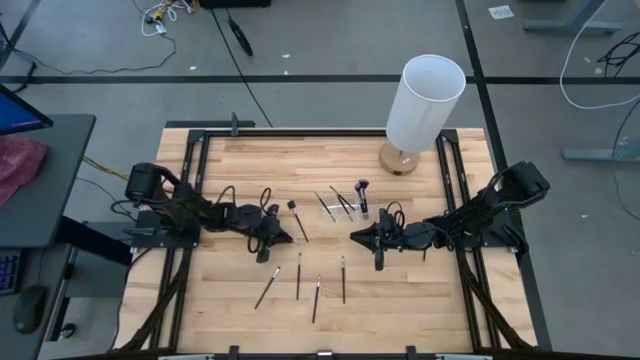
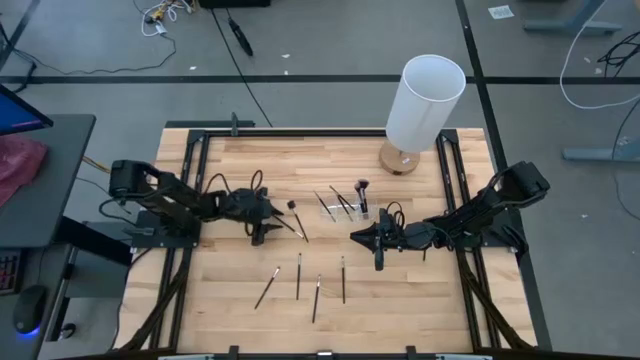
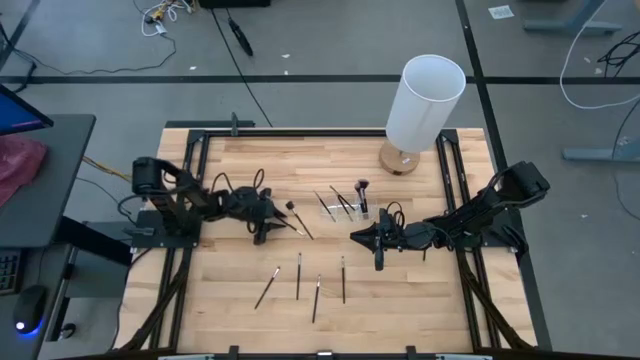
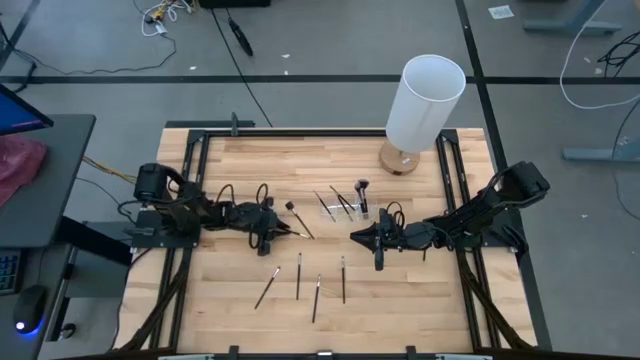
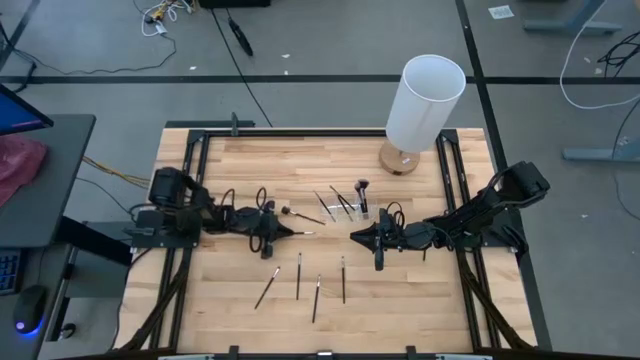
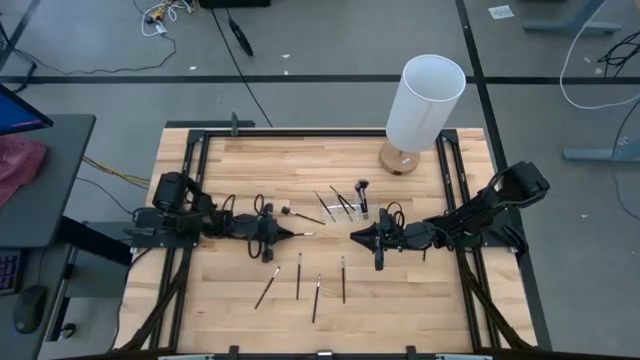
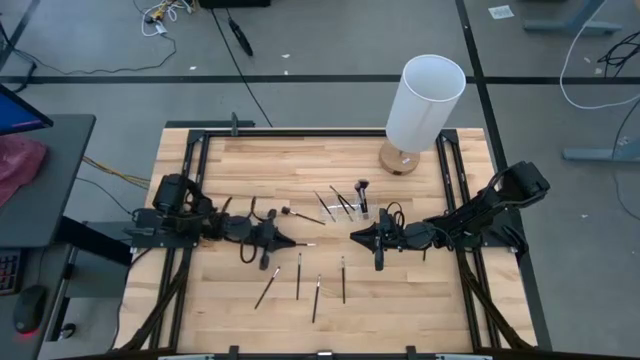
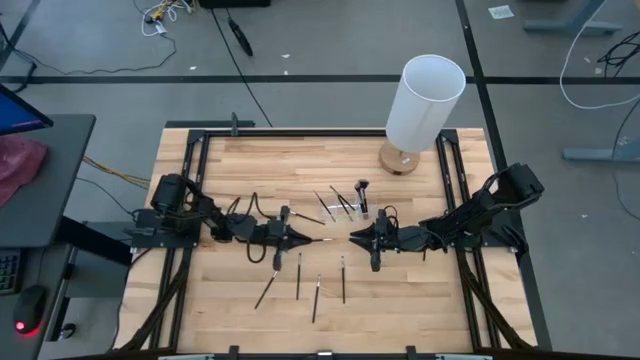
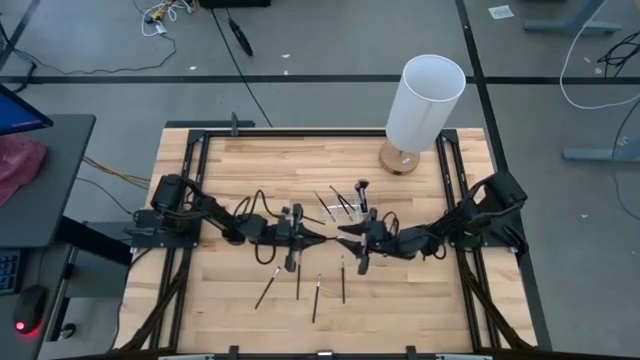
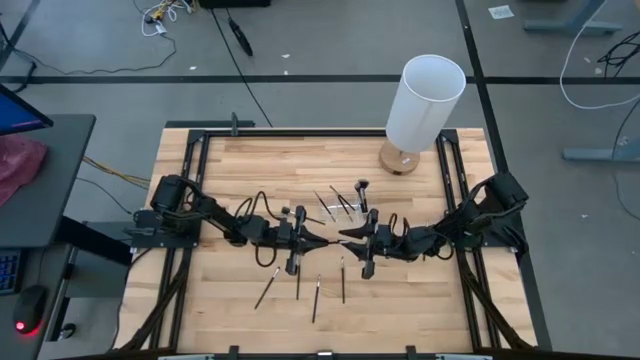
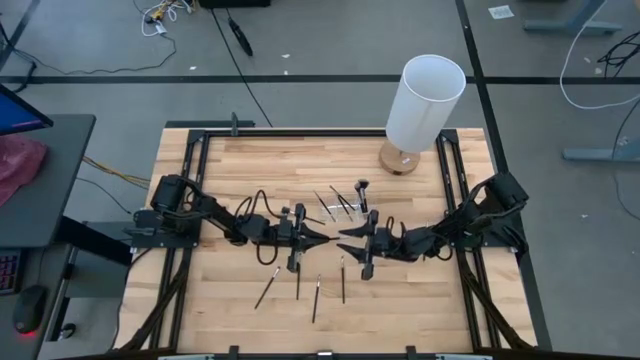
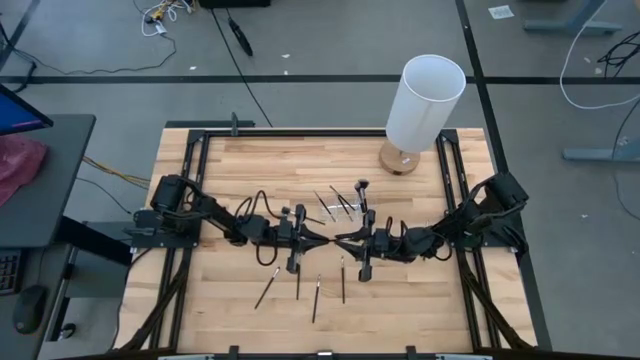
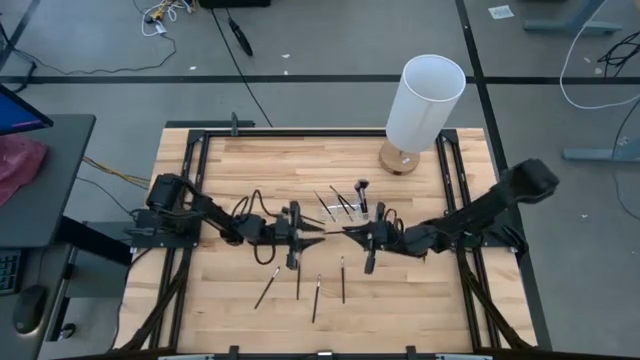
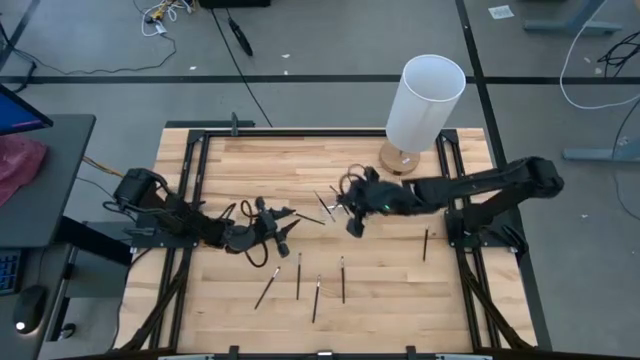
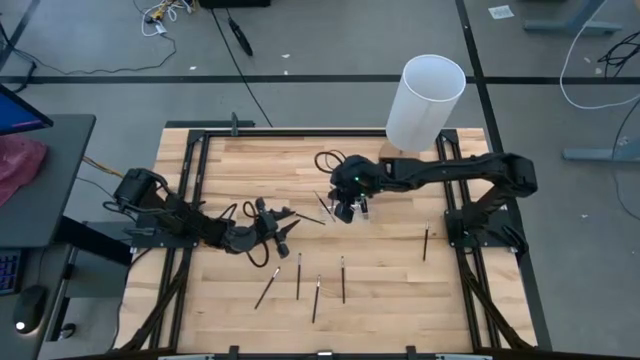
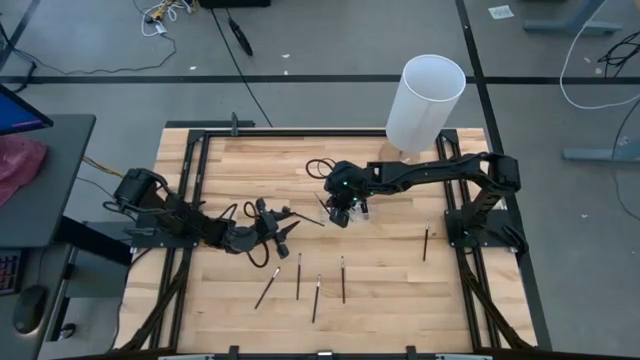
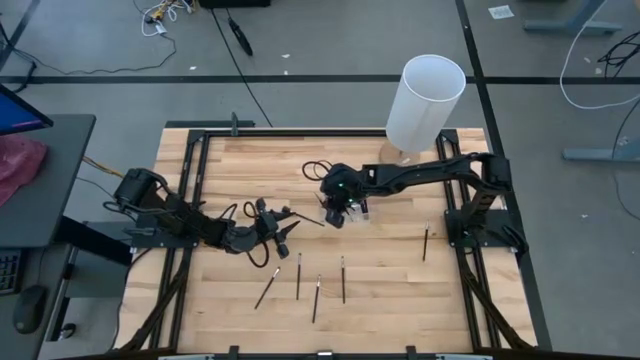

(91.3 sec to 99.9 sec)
Task: Pick & Place Makeup Supplies
Put the black makeup brush into the transparent organizer

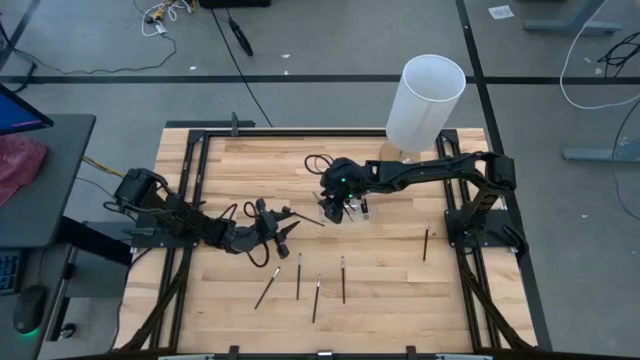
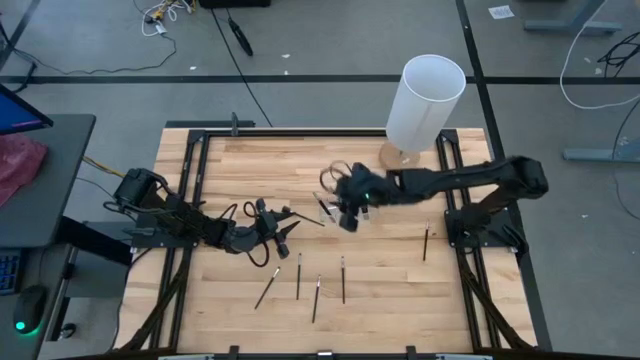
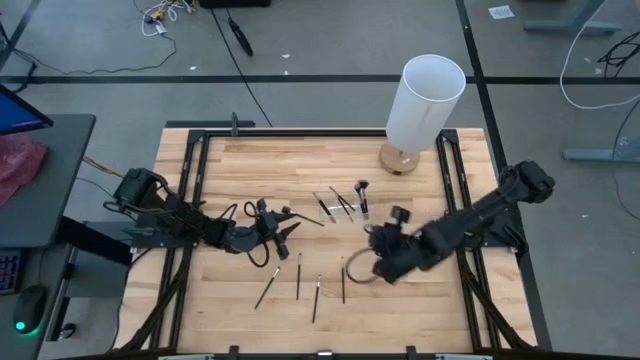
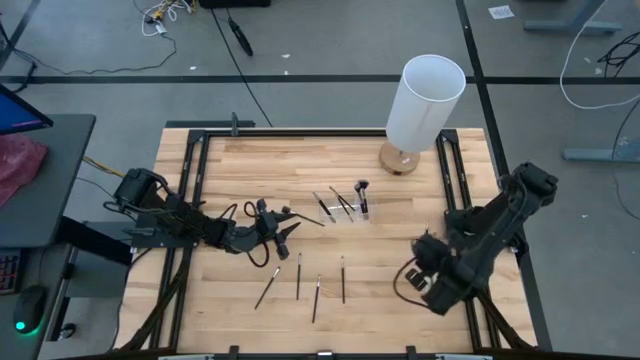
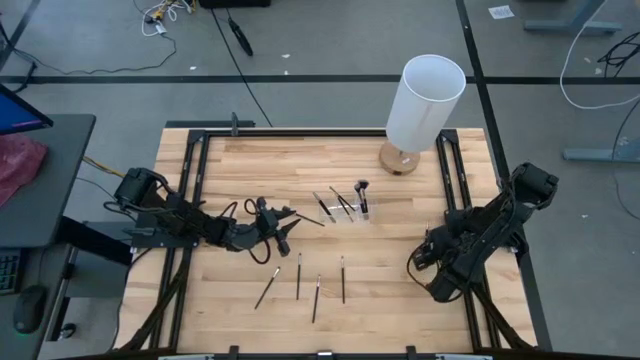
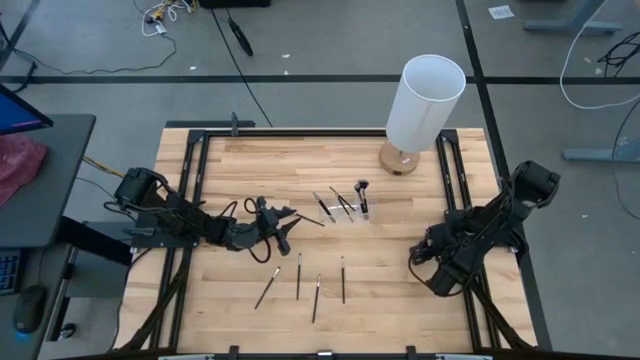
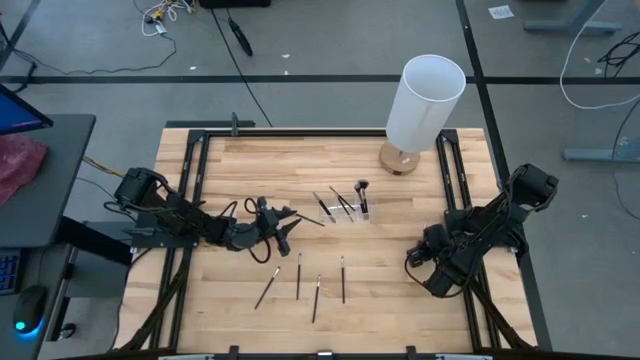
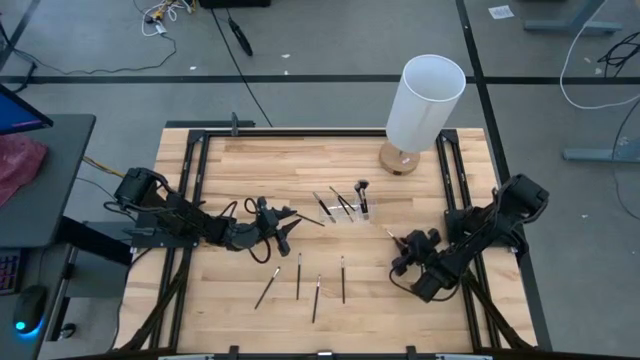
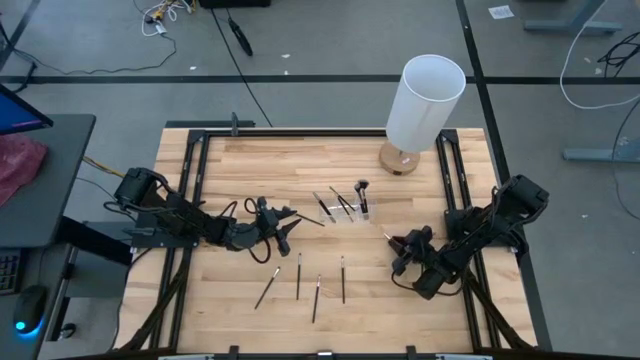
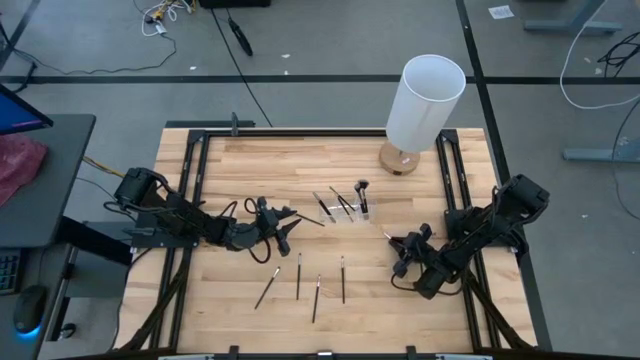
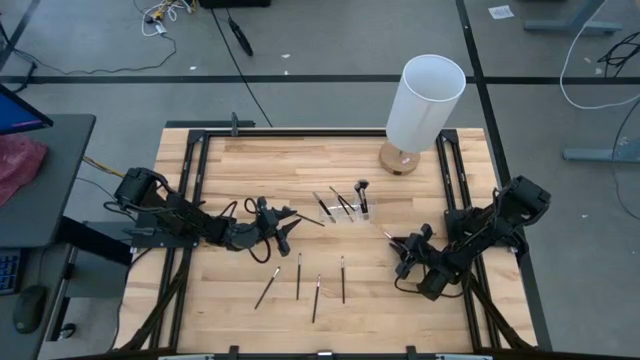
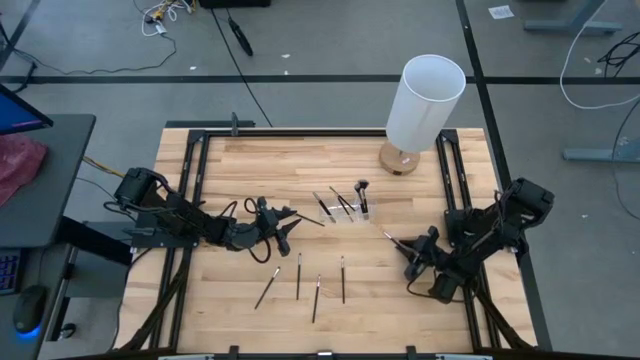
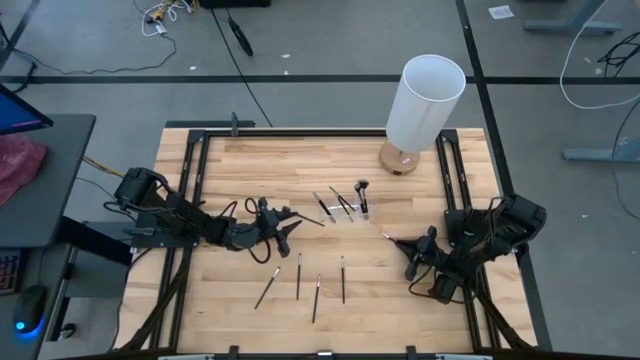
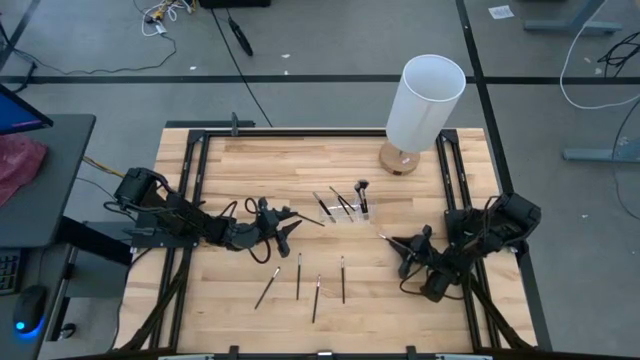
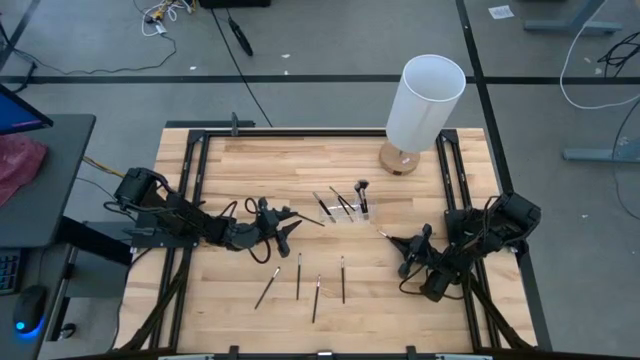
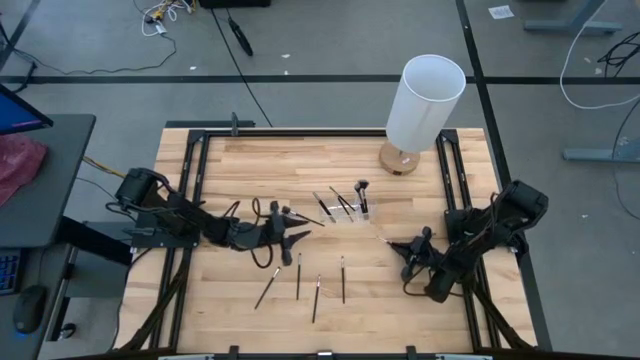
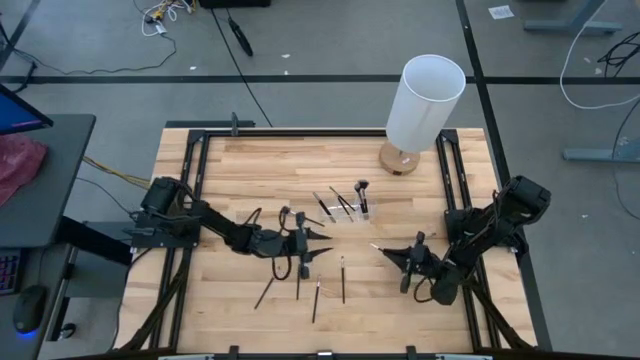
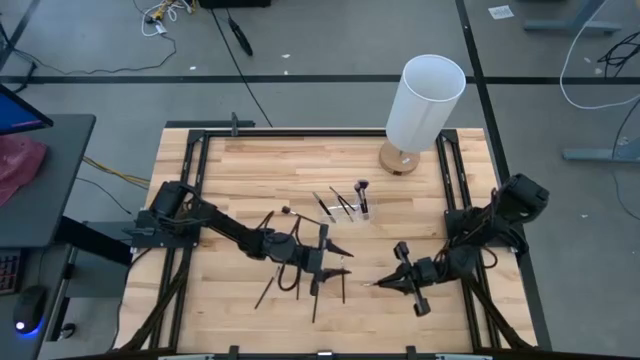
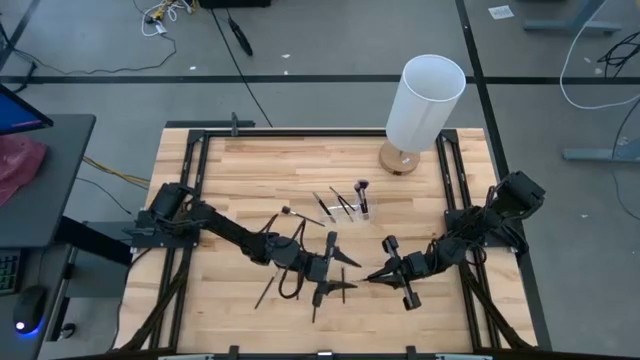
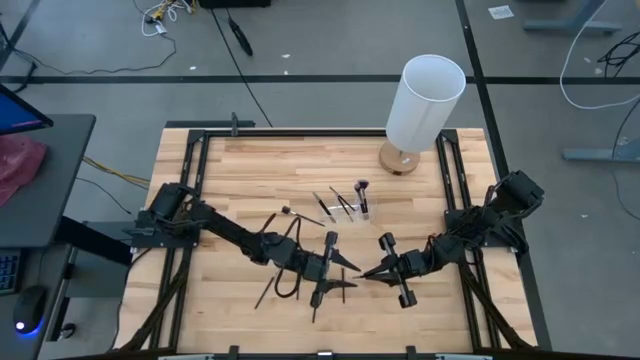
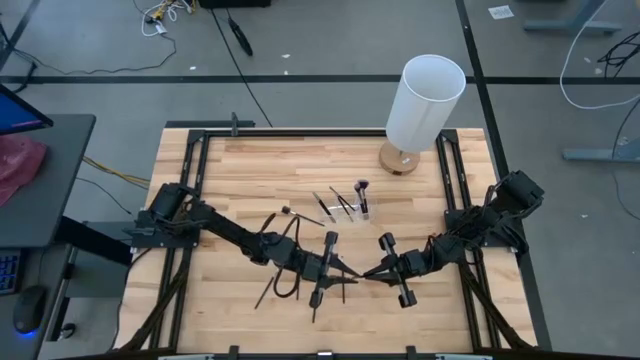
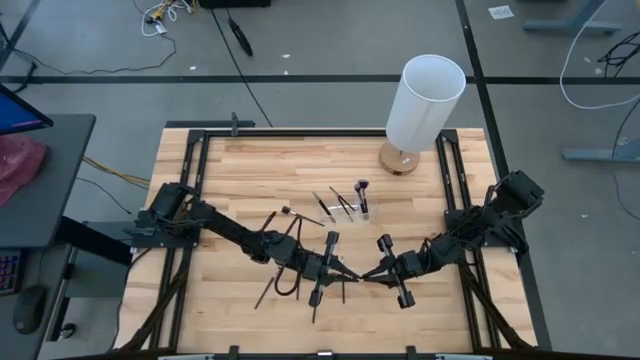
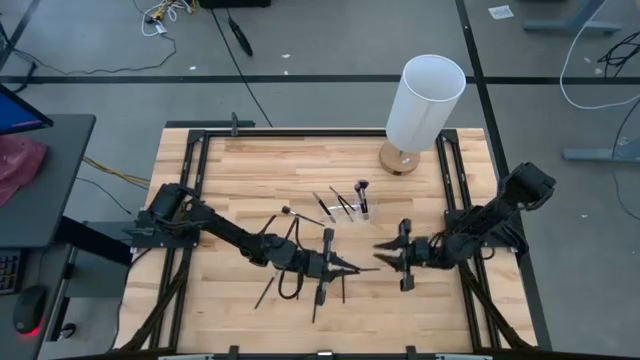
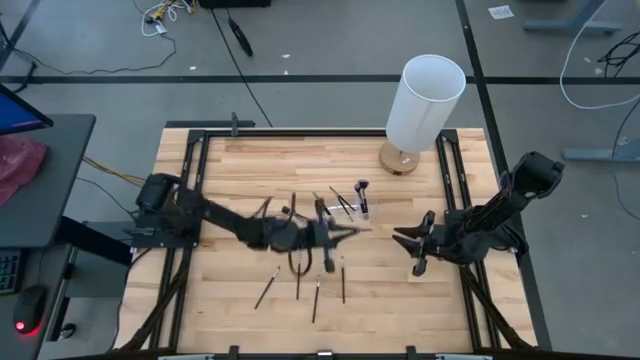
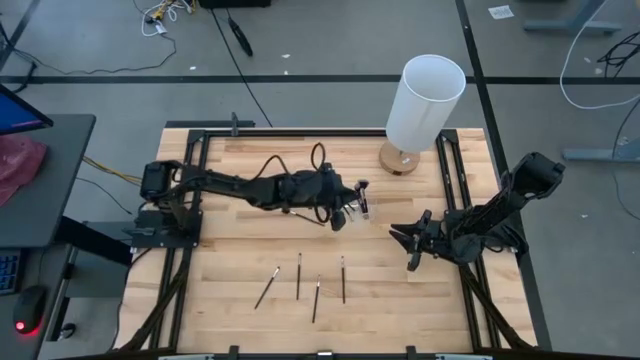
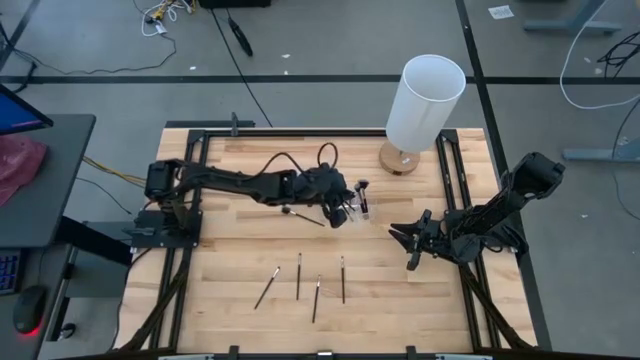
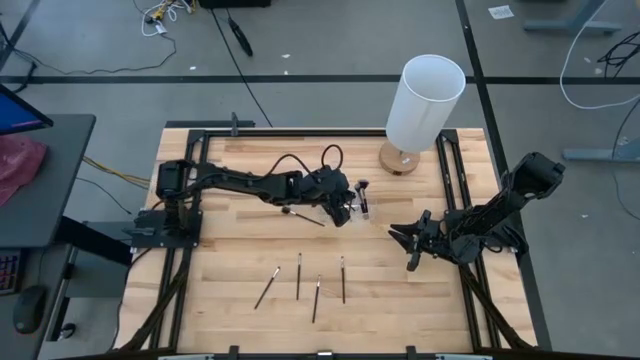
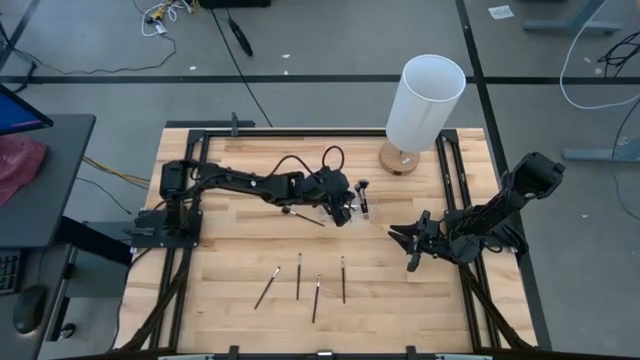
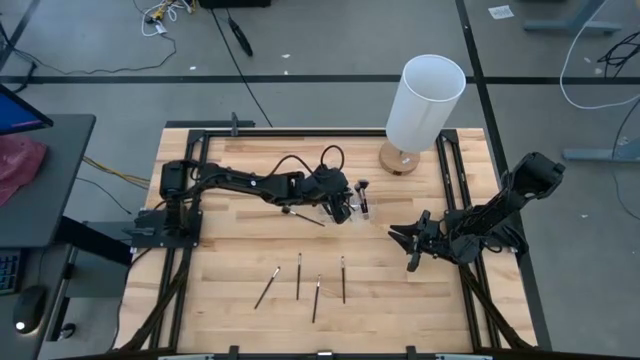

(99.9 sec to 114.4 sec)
Put the black makeup brush into the transparent organizer
